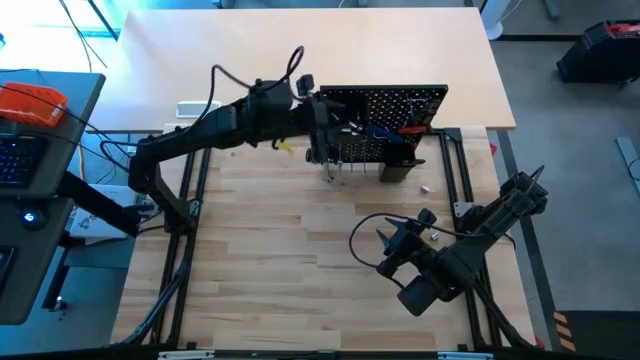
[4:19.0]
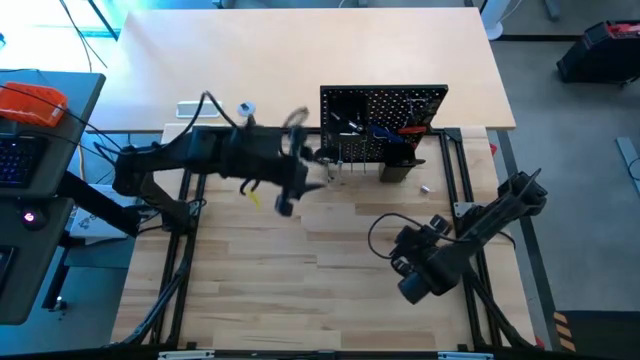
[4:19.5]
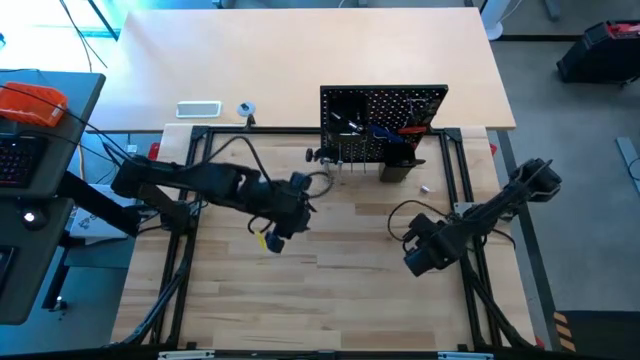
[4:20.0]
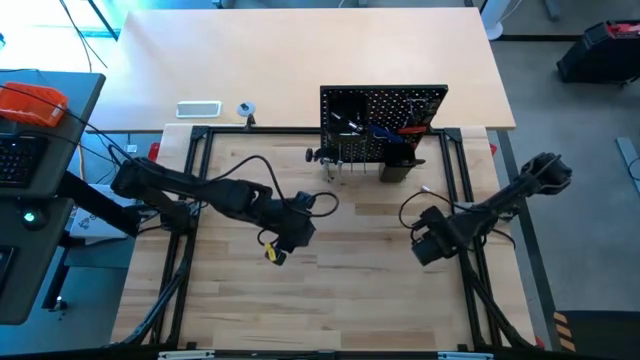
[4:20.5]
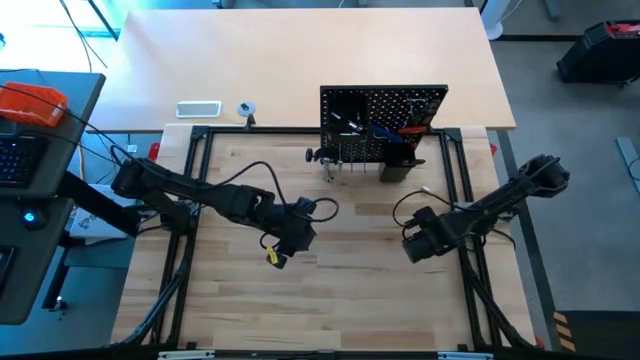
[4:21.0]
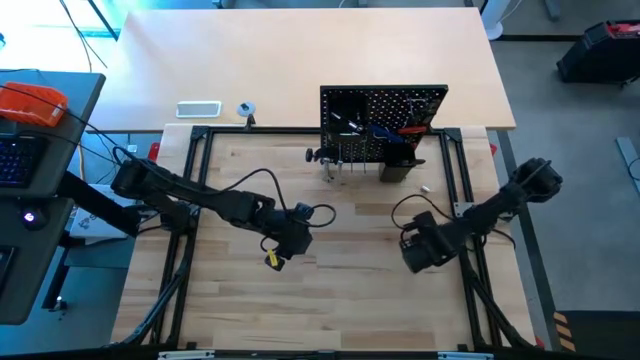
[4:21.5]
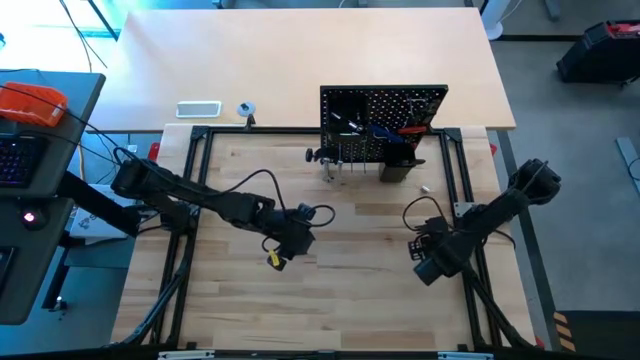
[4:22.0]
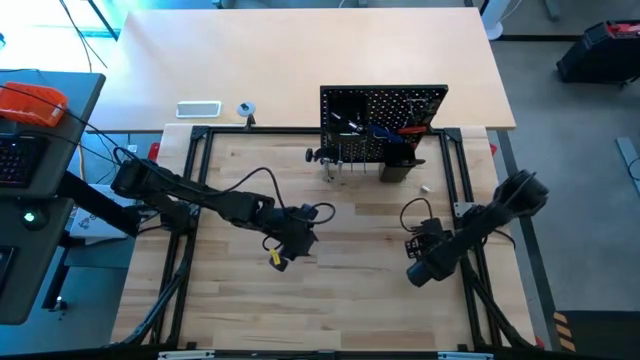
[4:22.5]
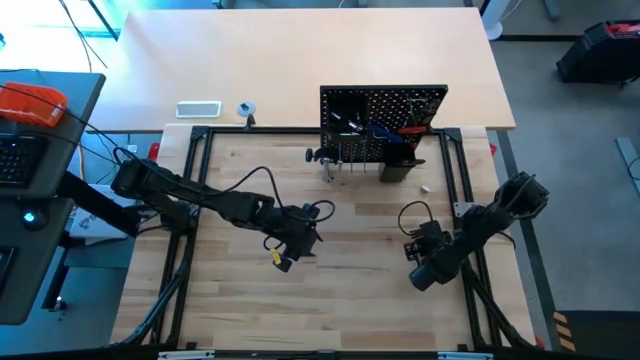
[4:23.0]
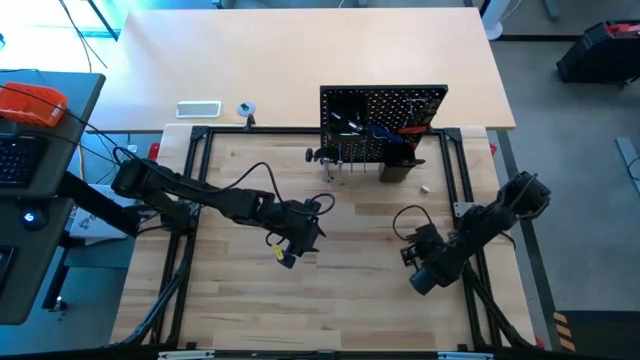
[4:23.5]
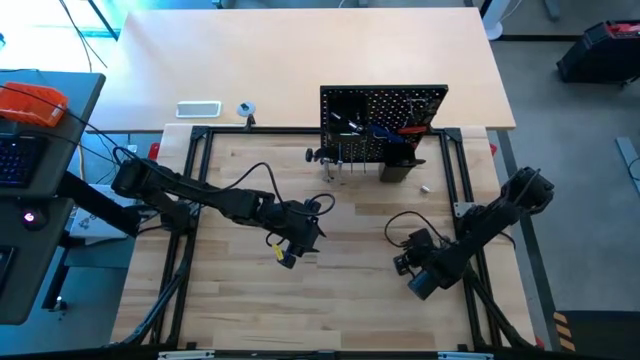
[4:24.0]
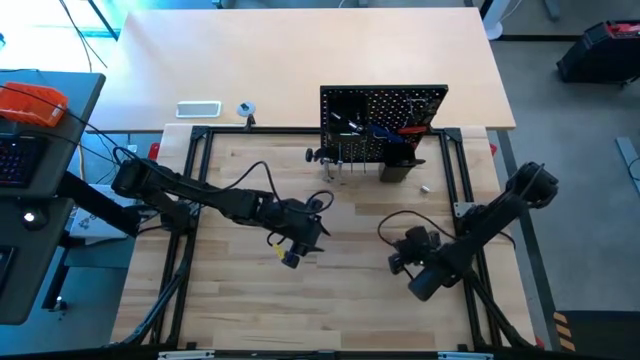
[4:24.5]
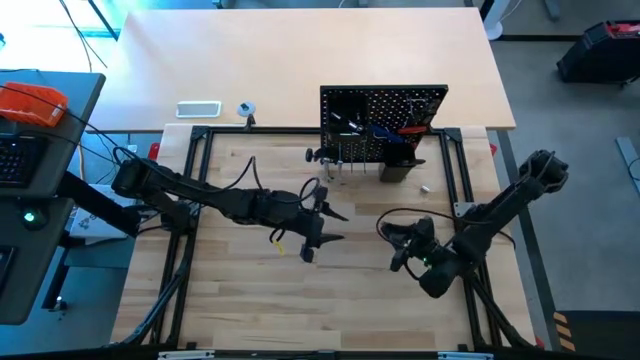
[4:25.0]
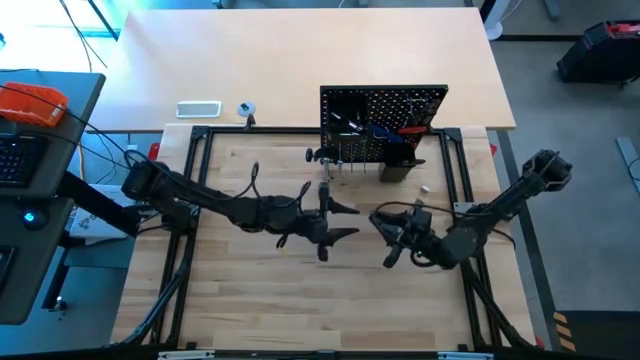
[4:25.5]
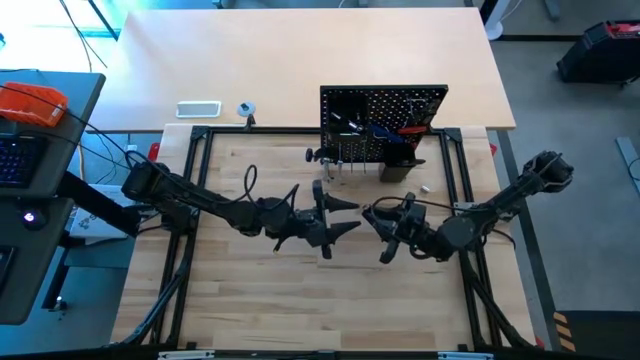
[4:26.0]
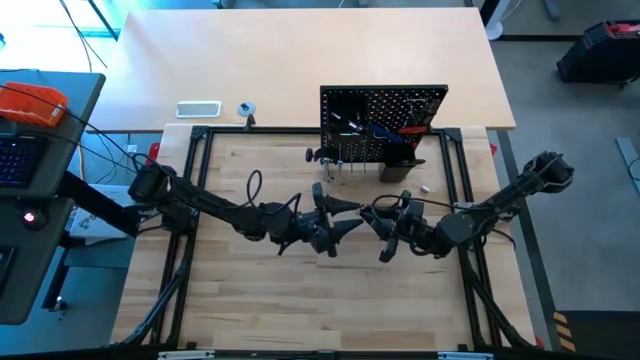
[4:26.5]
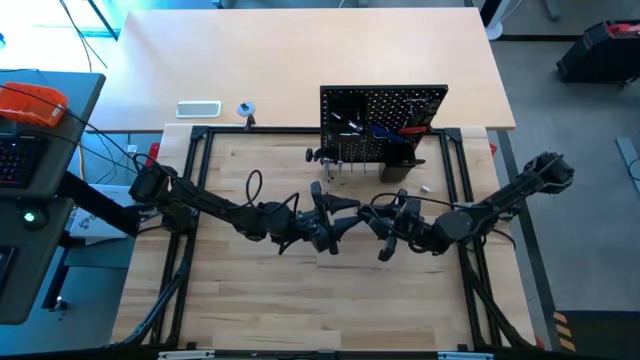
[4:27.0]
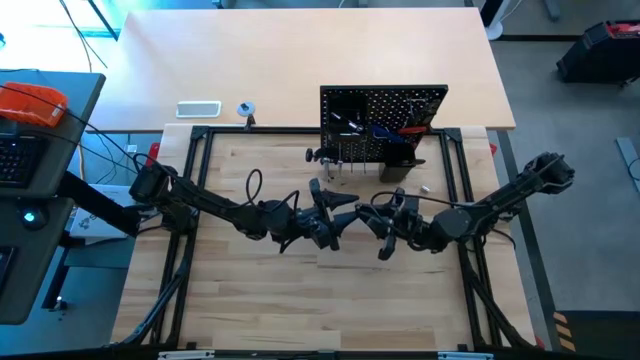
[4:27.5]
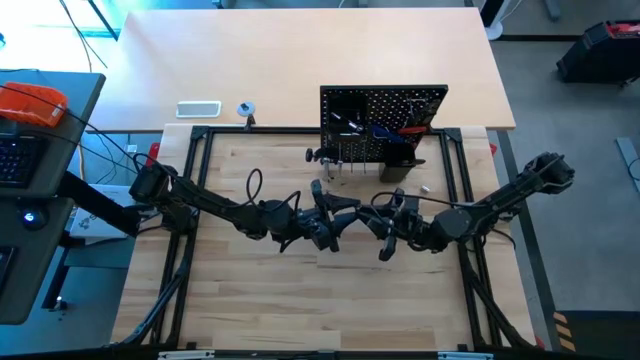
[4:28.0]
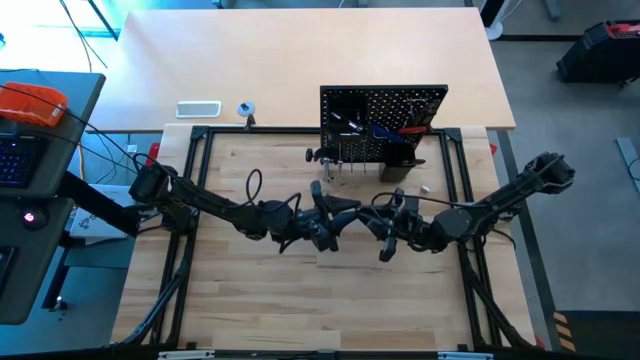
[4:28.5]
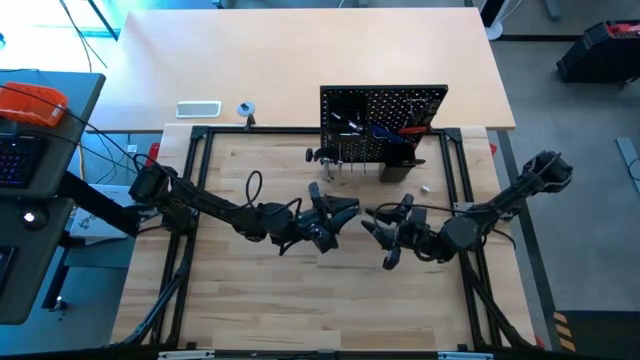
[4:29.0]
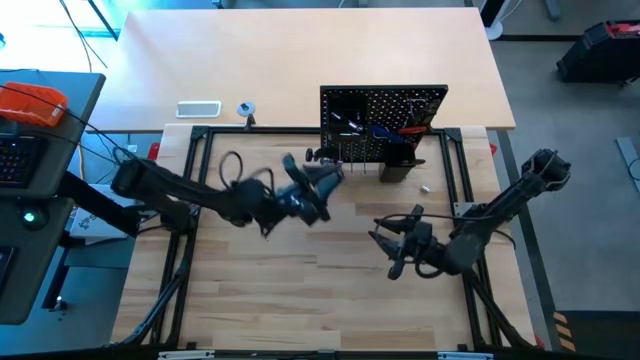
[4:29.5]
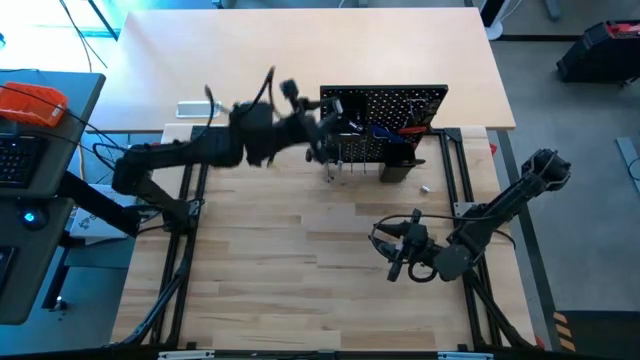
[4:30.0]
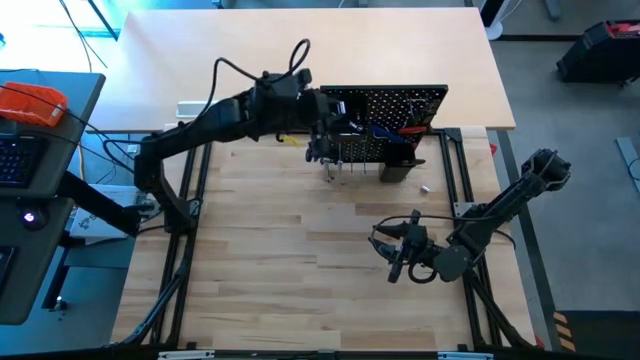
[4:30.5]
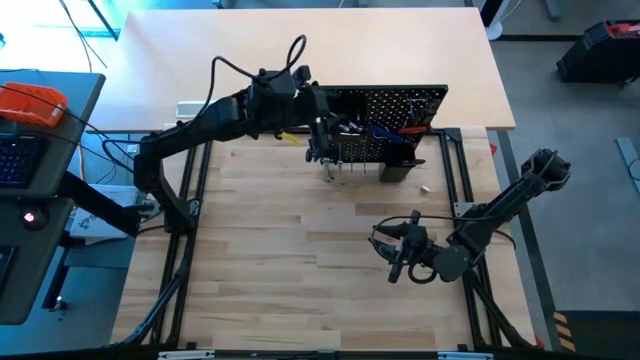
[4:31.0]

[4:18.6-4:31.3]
Task: Hang tools onto peg board
Hang the silver socket onto the pegboard

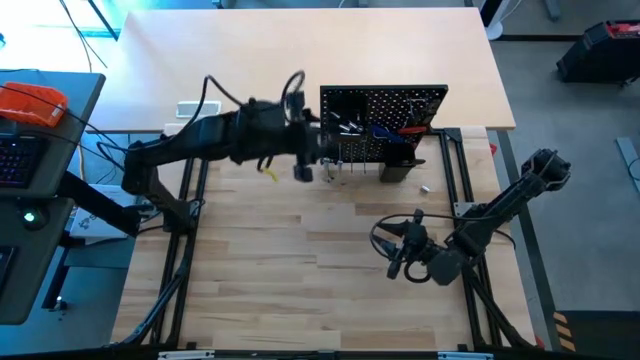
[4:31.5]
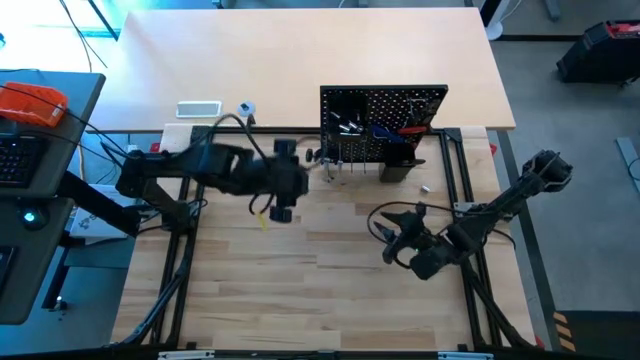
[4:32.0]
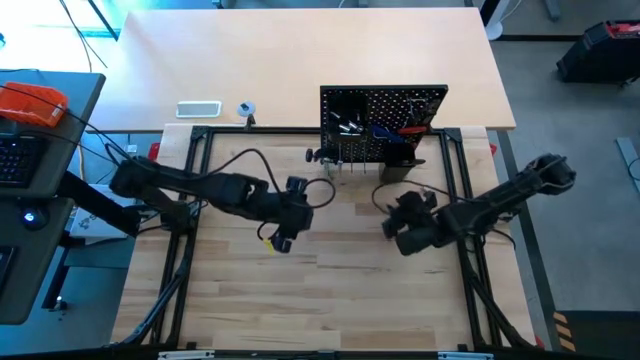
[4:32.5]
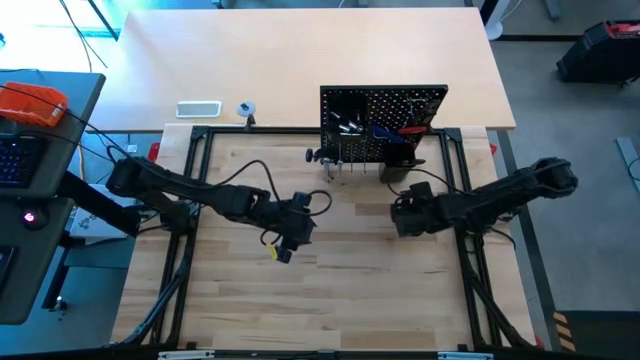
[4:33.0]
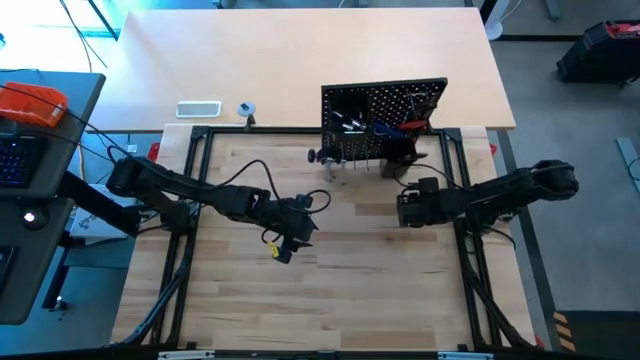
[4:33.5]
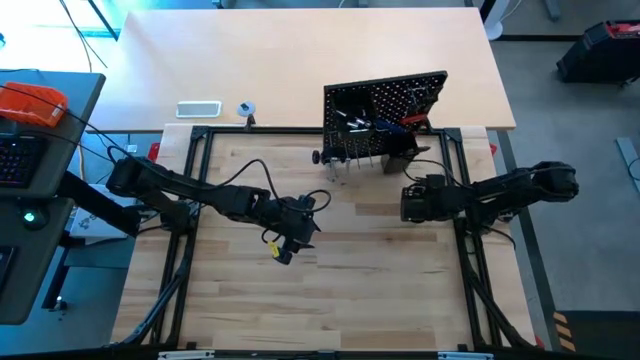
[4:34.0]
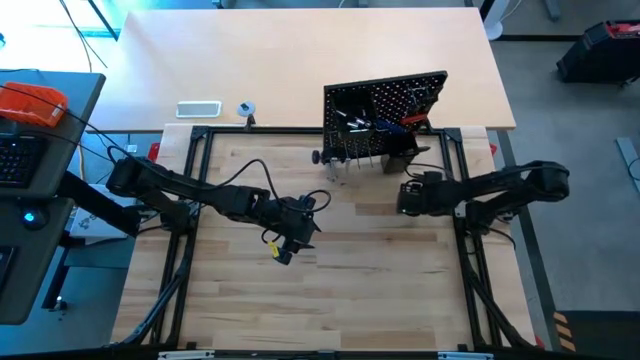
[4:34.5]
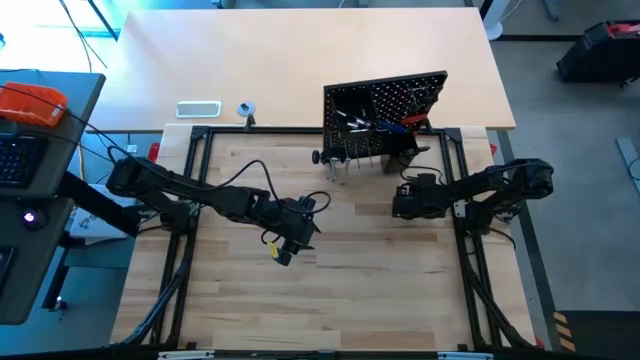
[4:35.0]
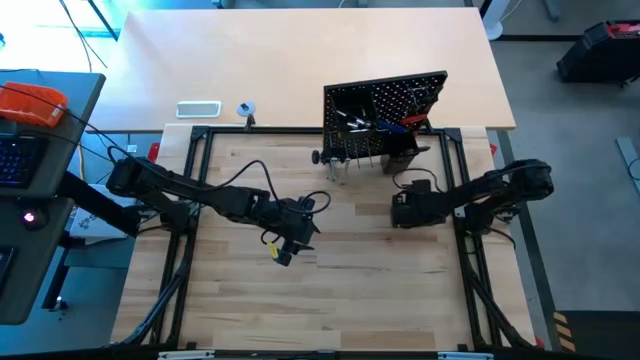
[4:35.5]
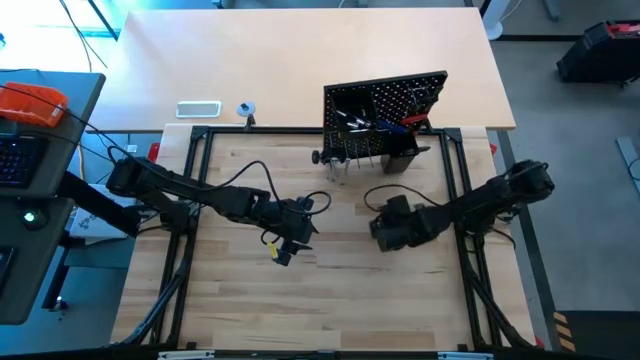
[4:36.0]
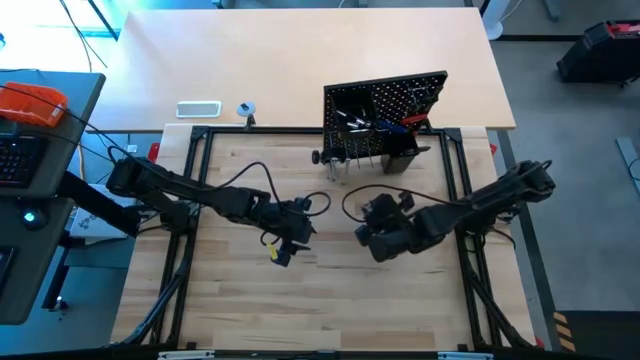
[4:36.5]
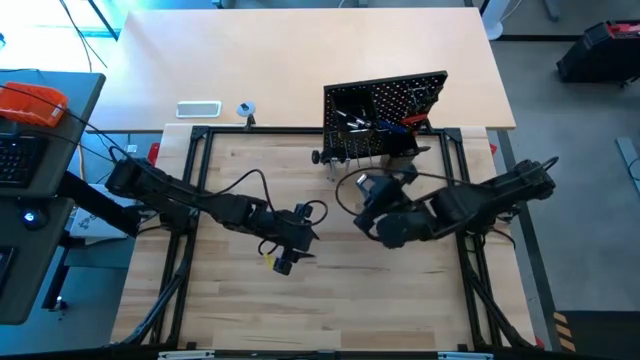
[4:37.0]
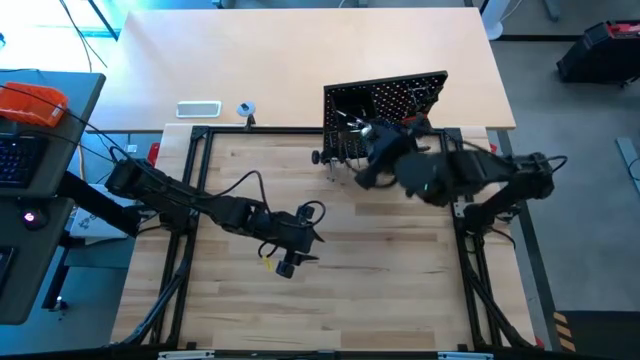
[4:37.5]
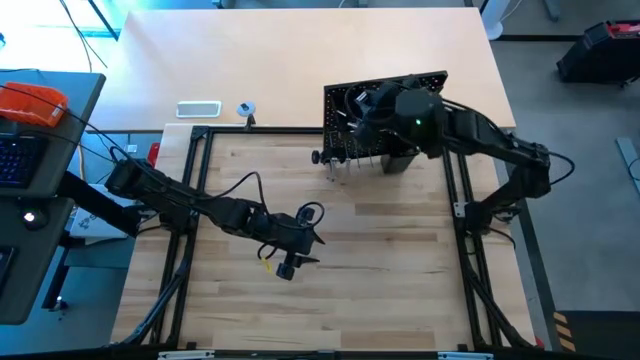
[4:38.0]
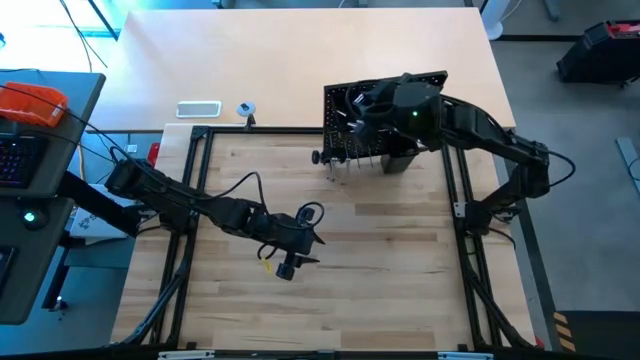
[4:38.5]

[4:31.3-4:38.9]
Hang the silver socket onto the pegboard

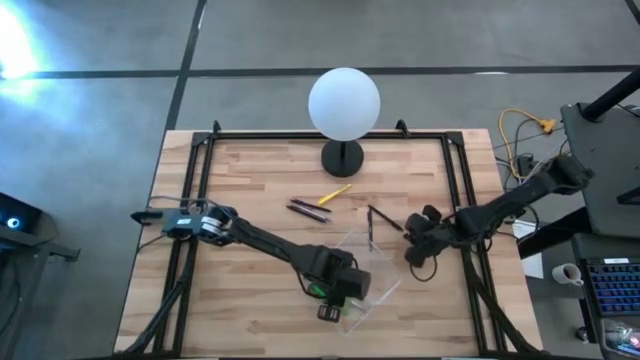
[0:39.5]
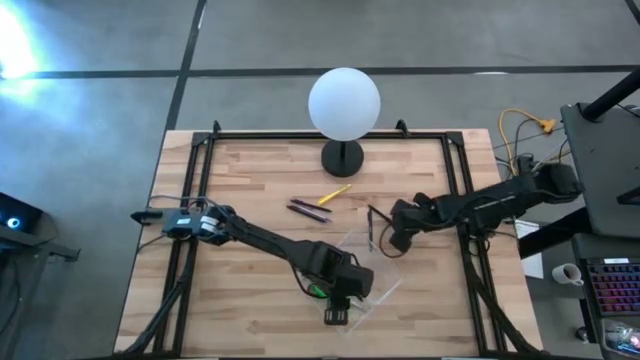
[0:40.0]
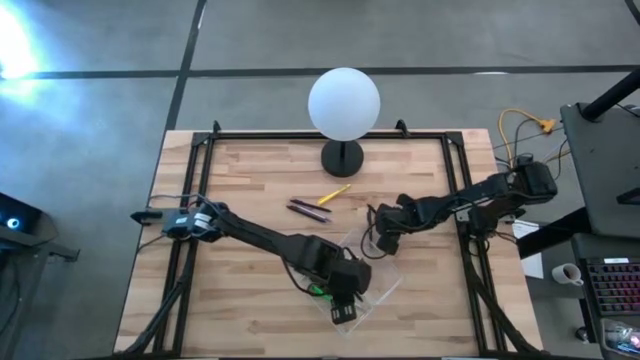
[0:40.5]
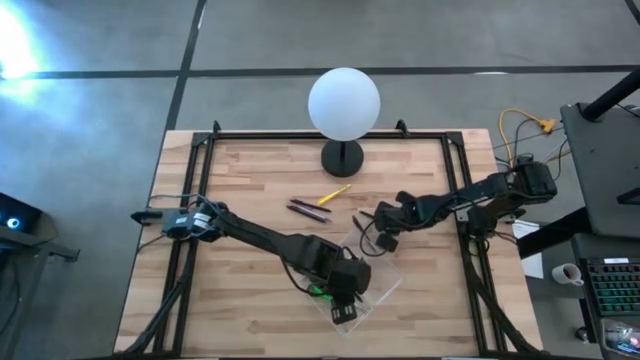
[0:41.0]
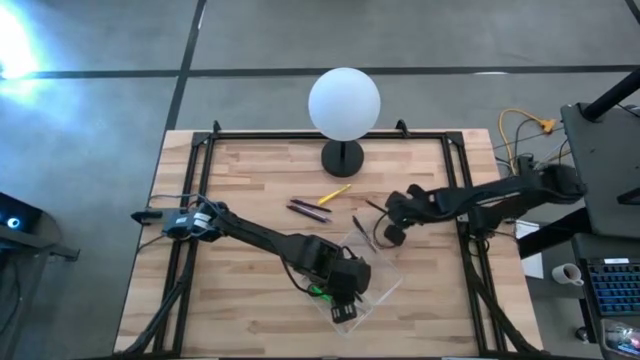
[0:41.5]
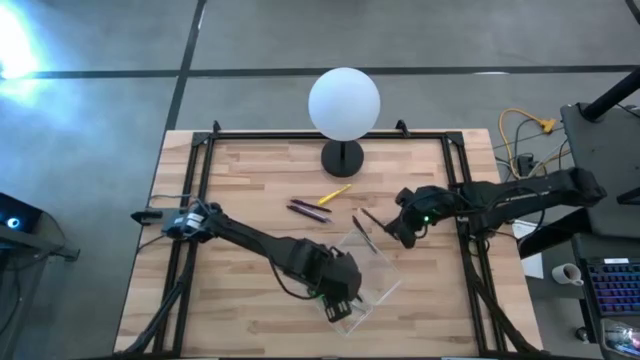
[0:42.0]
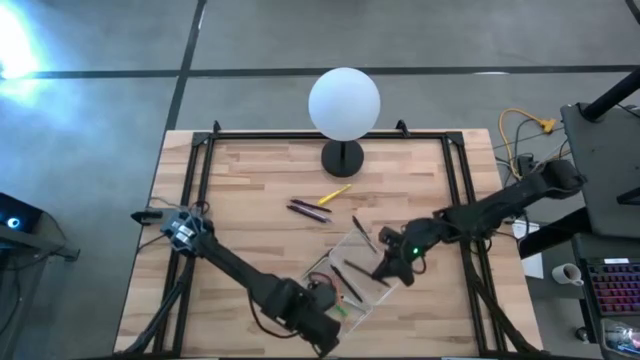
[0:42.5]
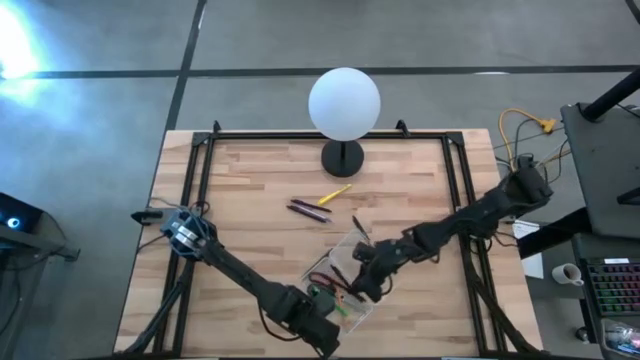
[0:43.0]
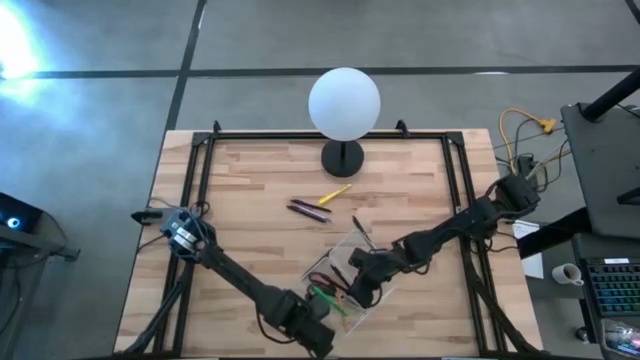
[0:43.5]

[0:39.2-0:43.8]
Task: Pick & place school supplies into a supply box
Put the black pen into the supply box
